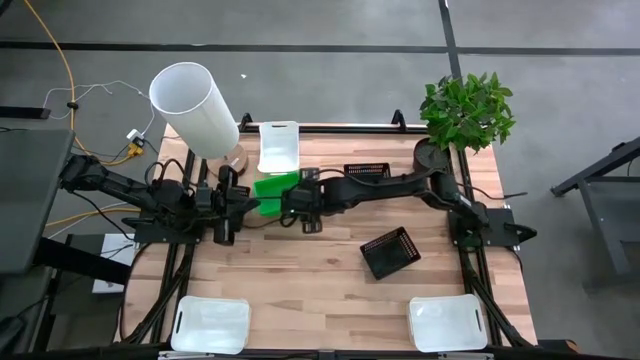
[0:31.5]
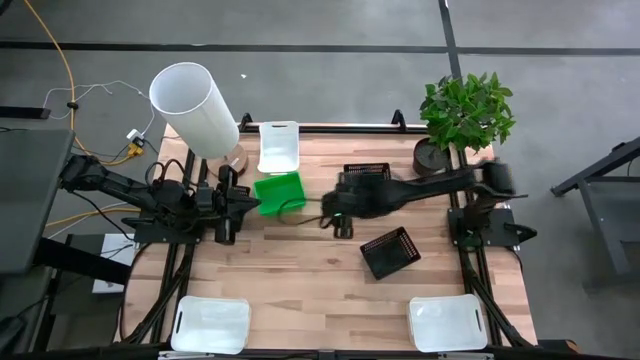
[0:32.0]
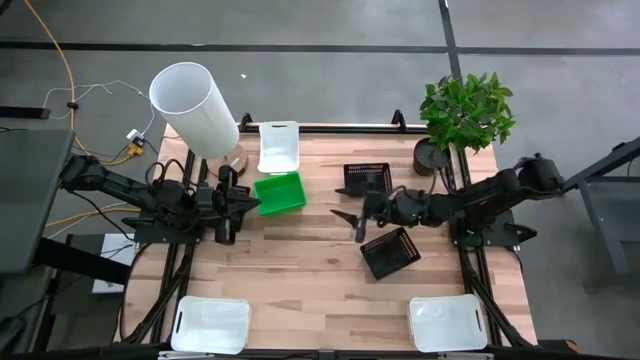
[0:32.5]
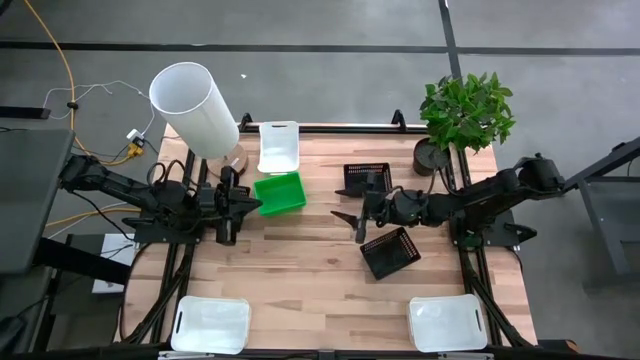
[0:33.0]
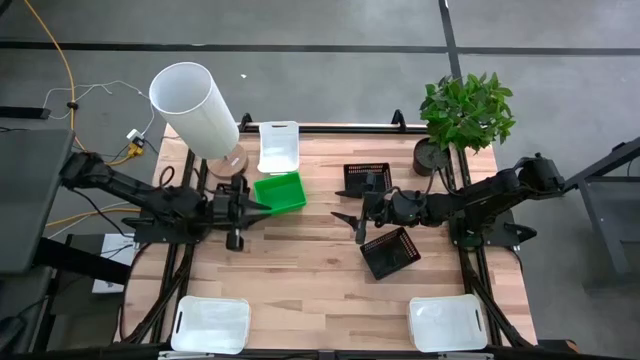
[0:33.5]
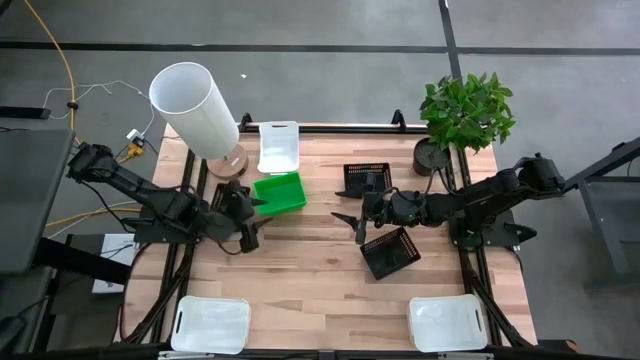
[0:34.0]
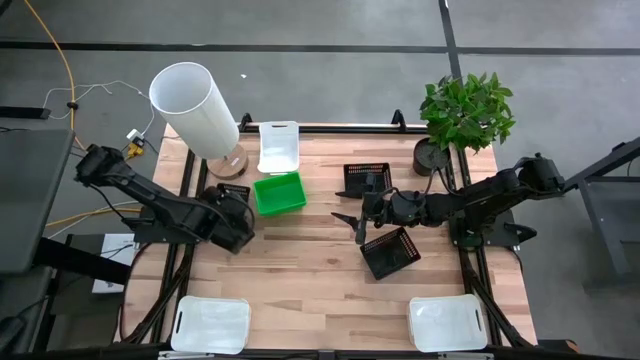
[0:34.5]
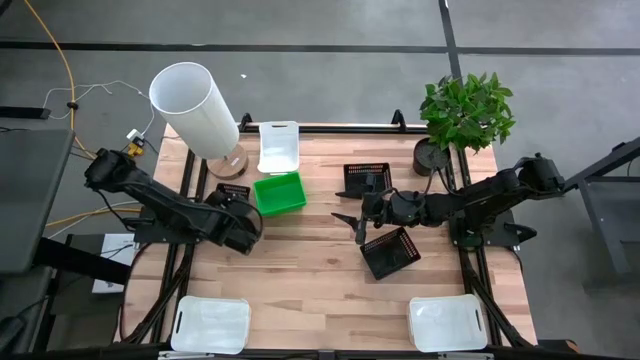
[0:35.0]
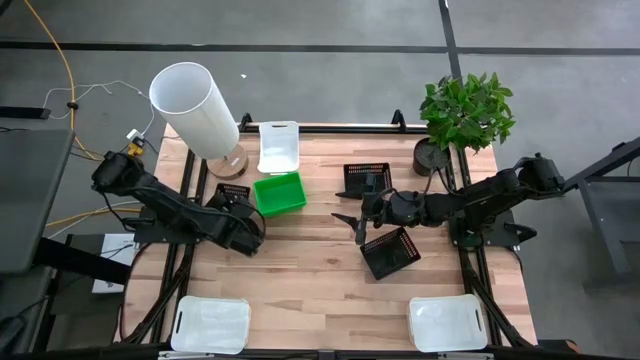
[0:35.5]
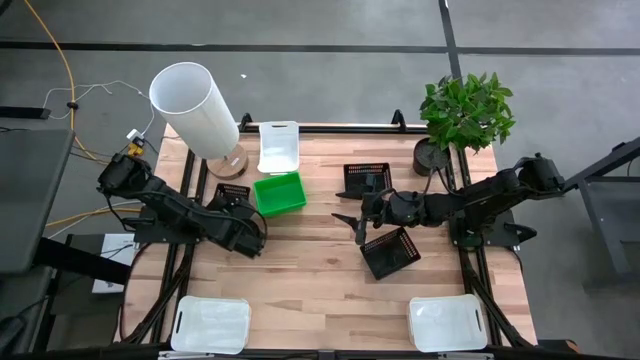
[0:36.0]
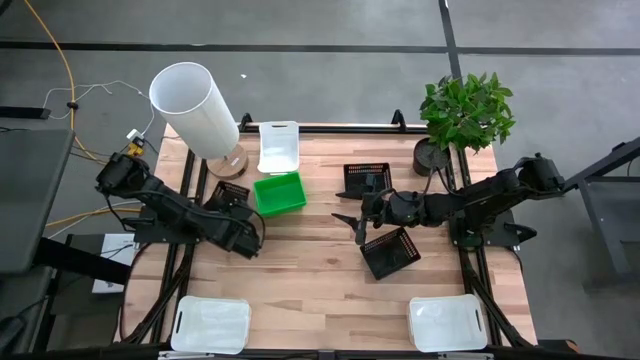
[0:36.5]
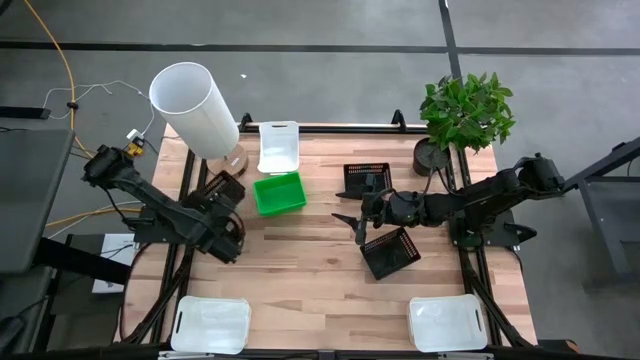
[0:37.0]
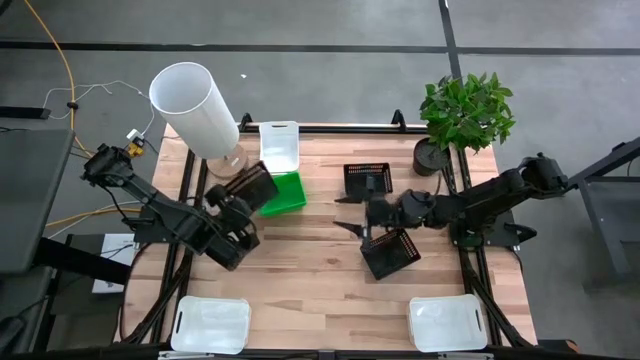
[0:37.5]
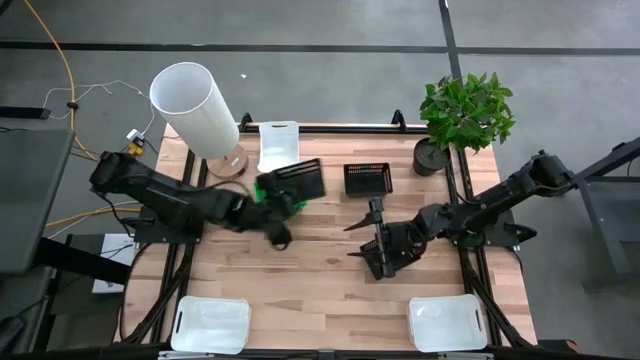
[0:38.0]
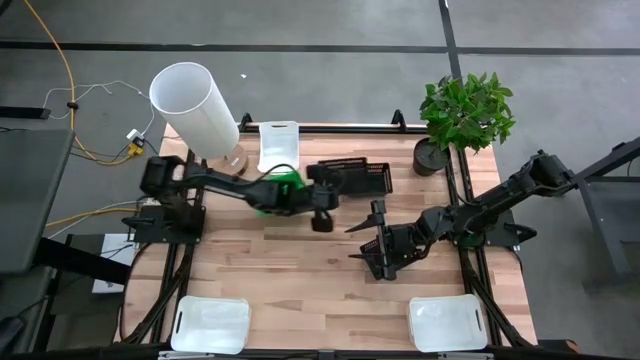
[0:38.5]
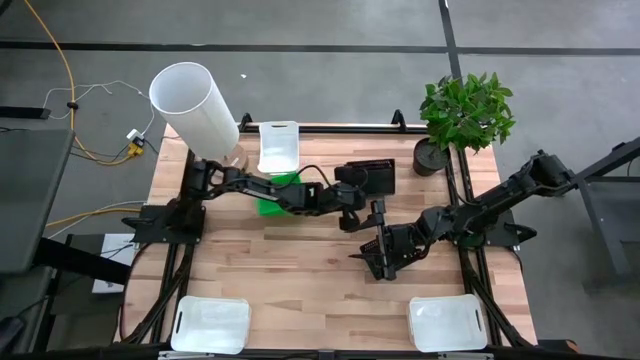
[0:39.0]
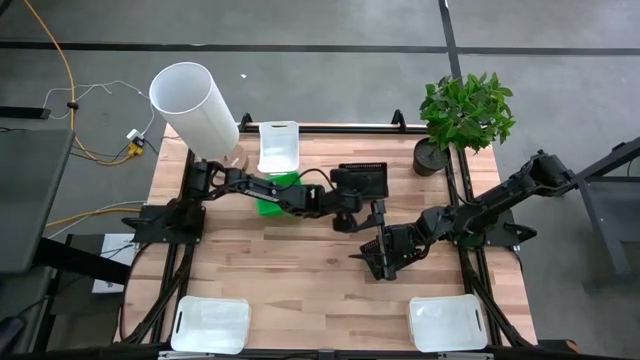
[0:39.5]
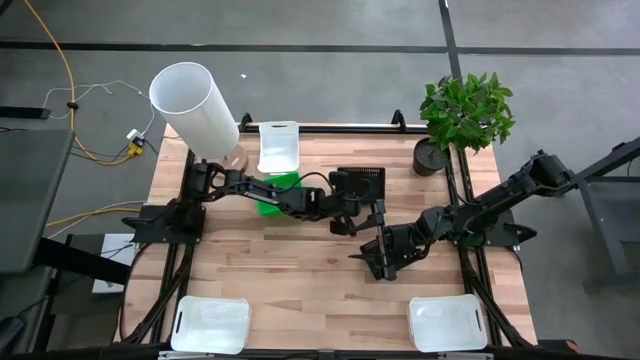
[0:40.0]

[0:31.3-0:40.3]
Stack the left black bin on the top-right black bin

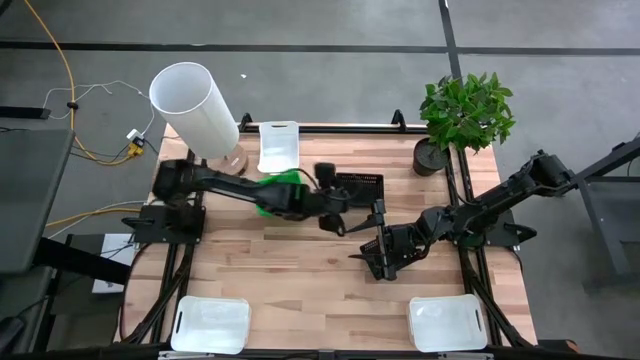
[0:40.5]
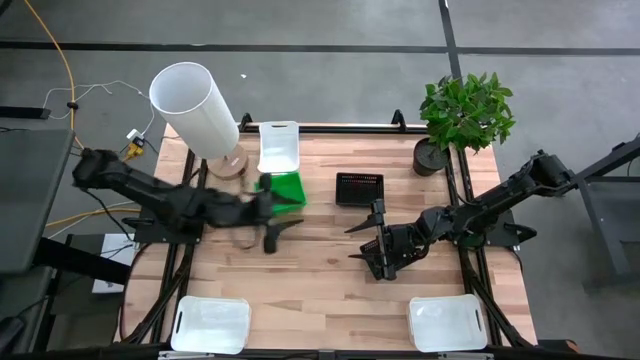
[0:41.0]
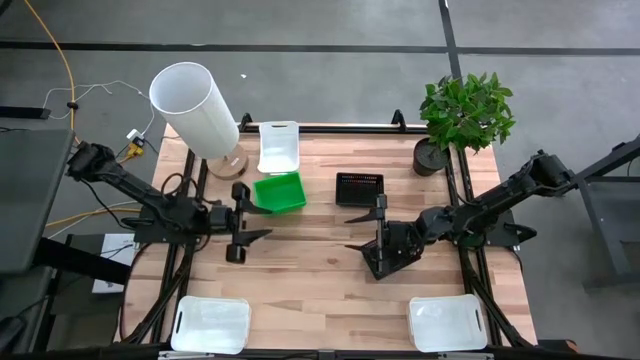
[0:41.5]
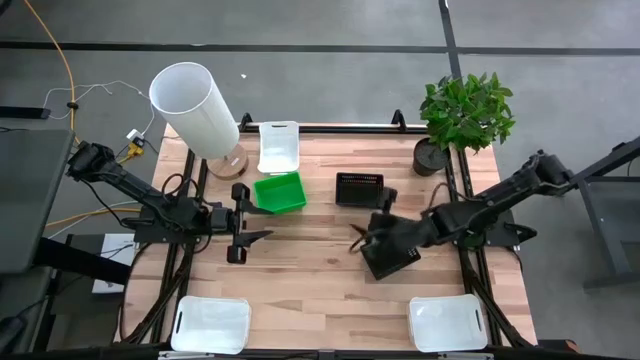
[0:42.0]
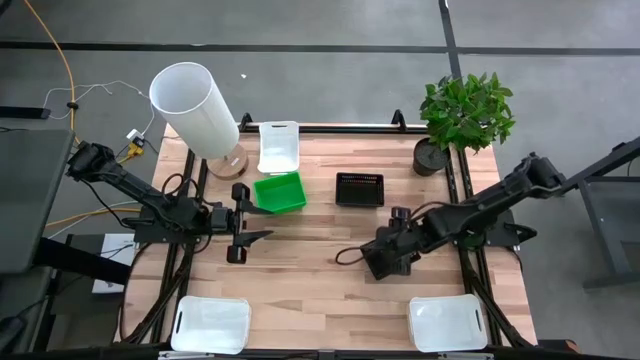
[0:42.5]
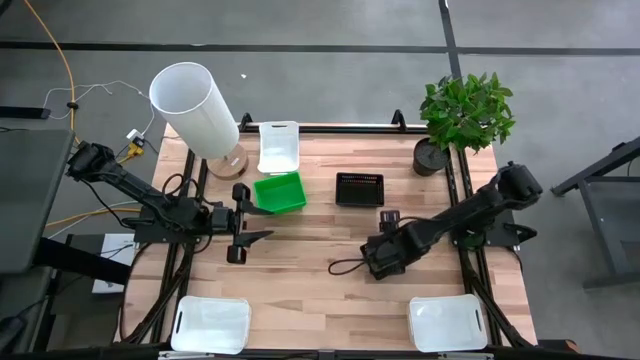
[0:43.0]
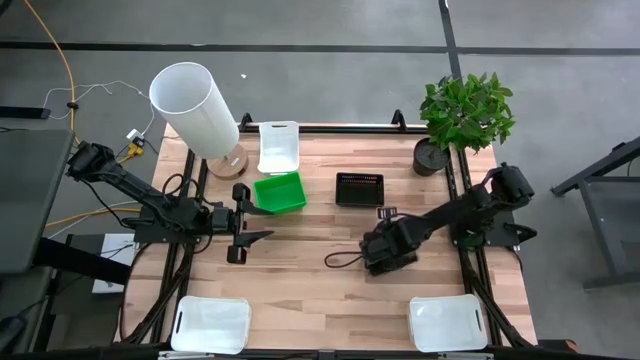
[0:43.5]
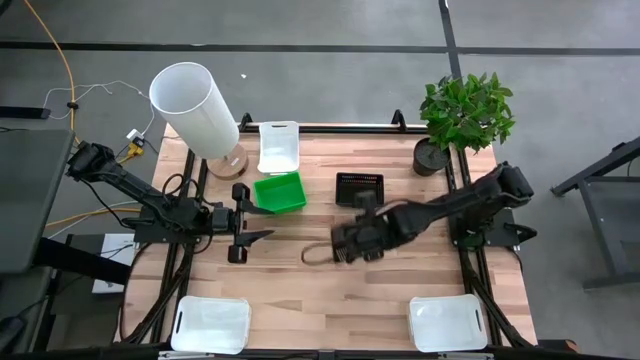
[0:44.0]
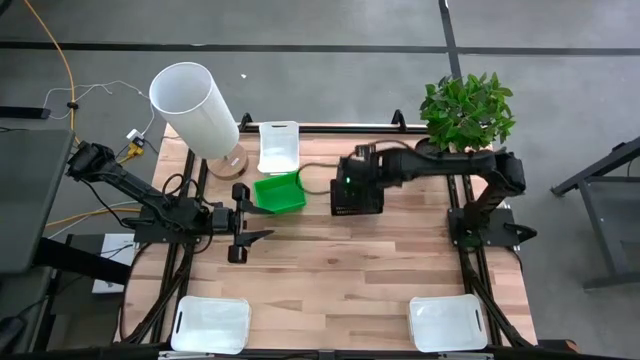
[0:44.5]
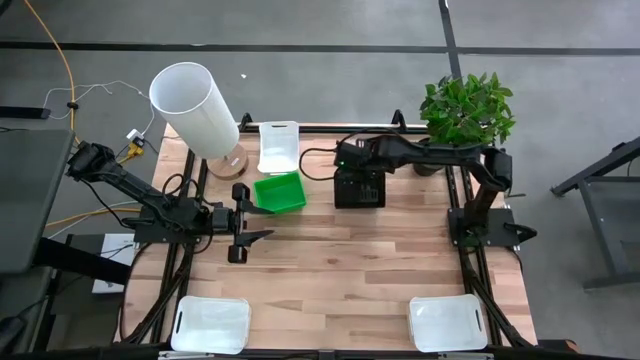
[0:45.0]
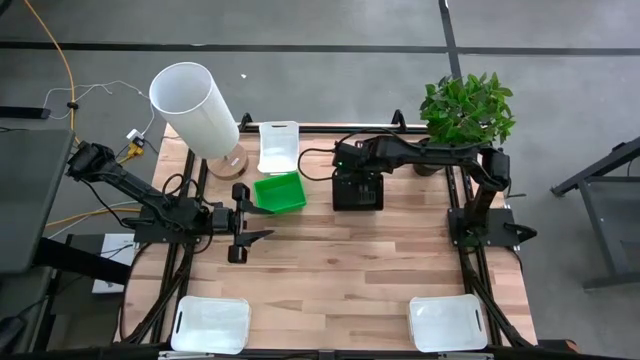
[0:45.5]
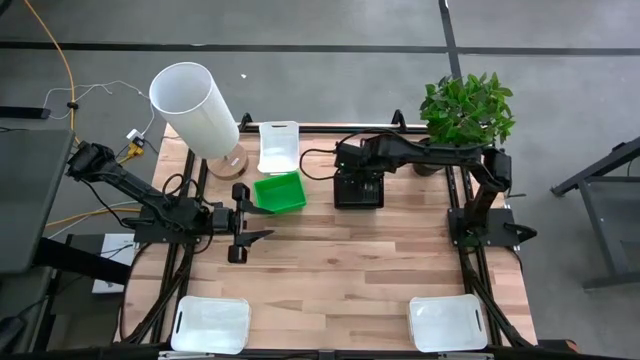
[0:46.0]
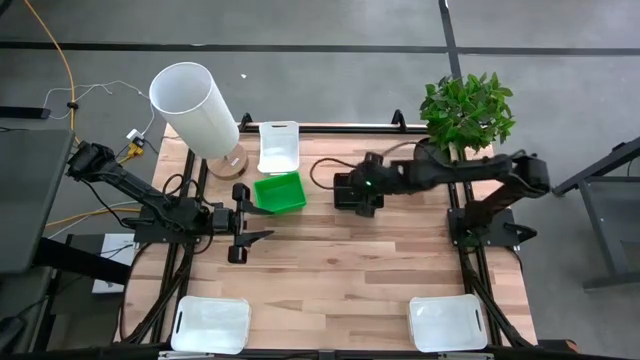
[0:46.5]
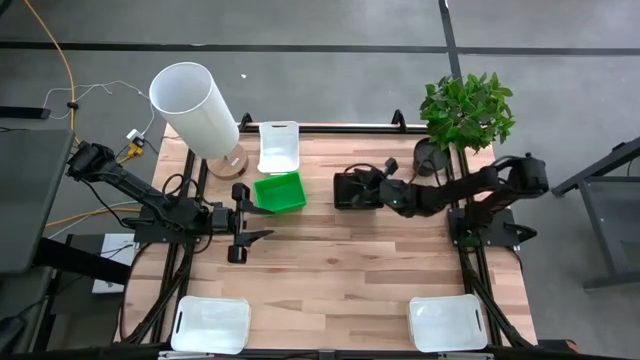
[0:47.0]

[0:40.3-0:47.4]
Stack the bottom black bin on the black bin

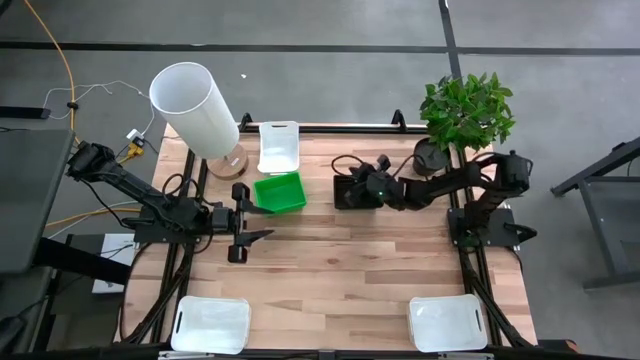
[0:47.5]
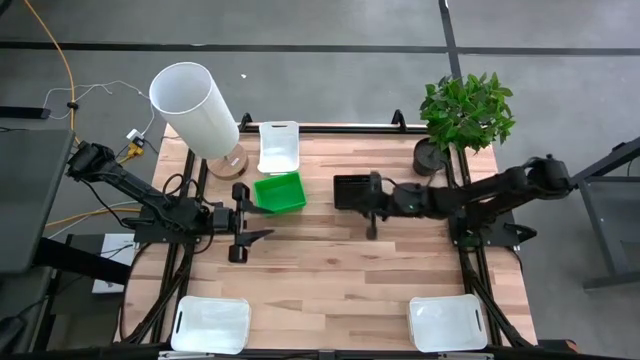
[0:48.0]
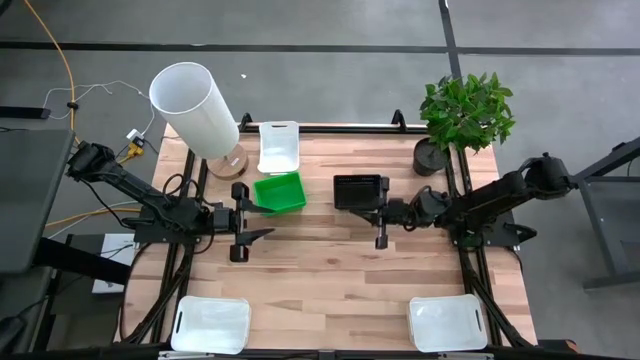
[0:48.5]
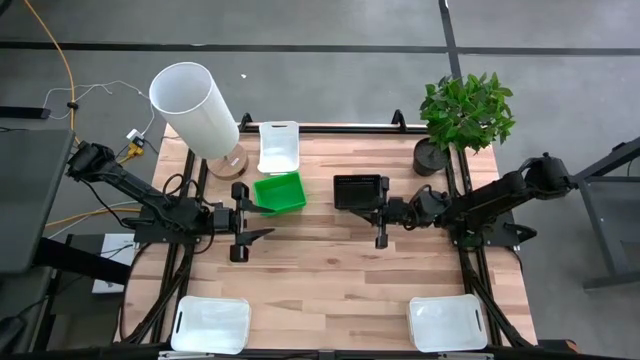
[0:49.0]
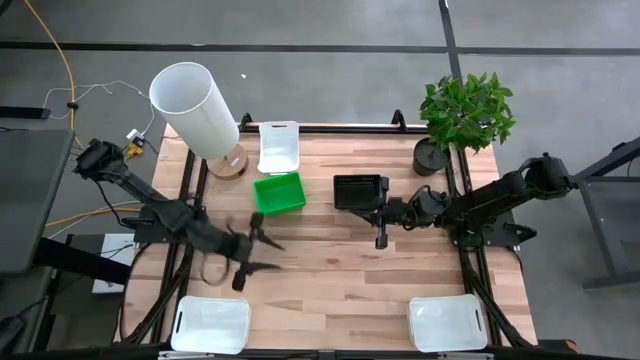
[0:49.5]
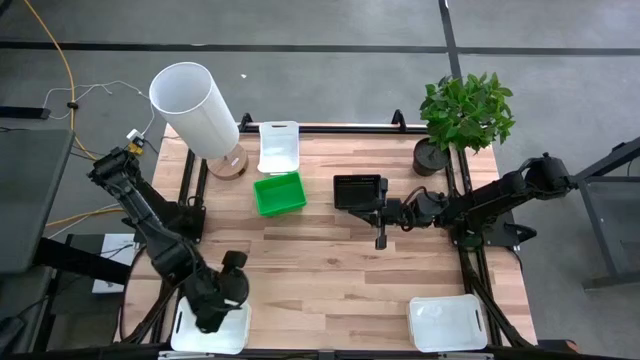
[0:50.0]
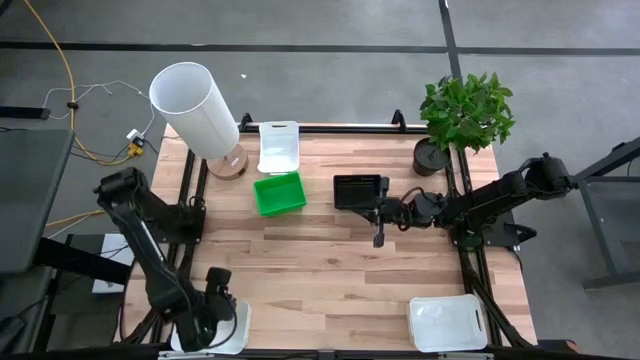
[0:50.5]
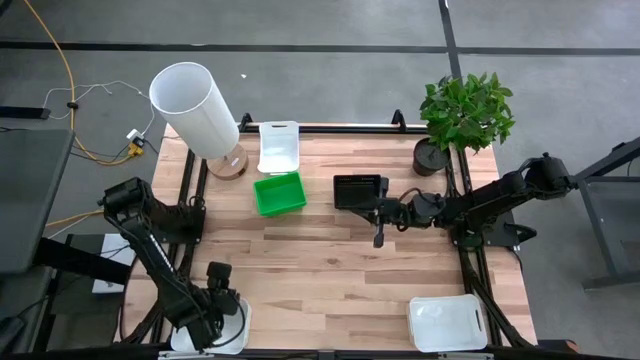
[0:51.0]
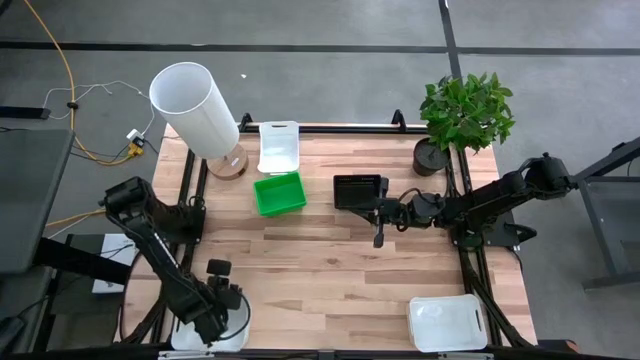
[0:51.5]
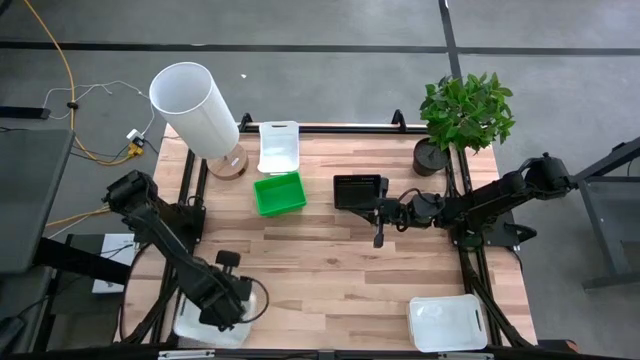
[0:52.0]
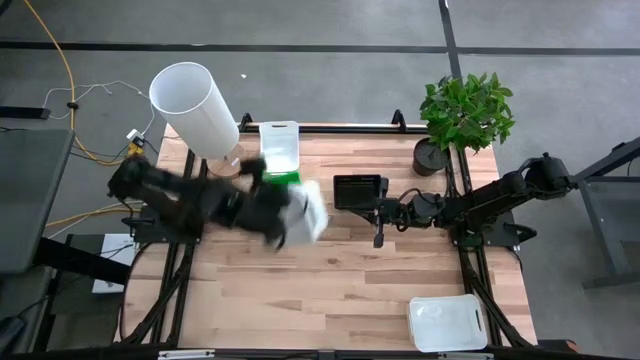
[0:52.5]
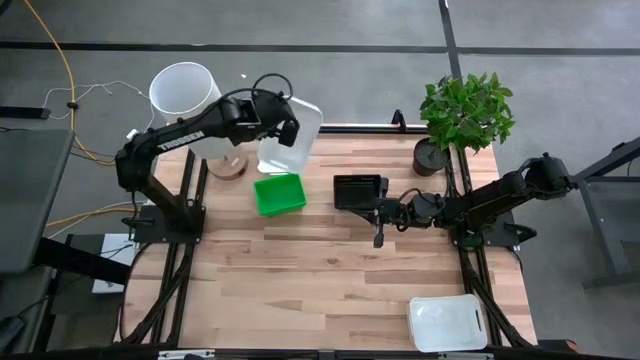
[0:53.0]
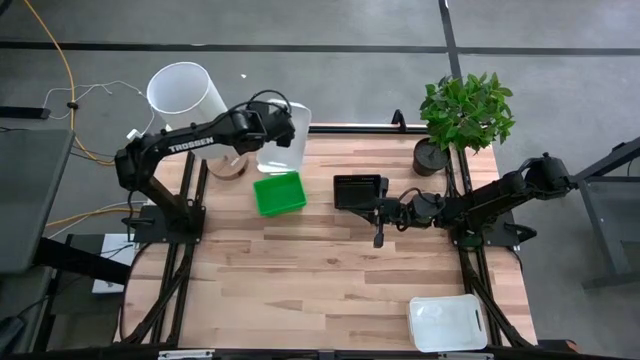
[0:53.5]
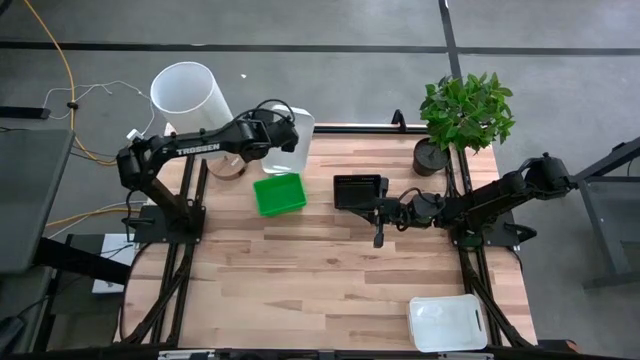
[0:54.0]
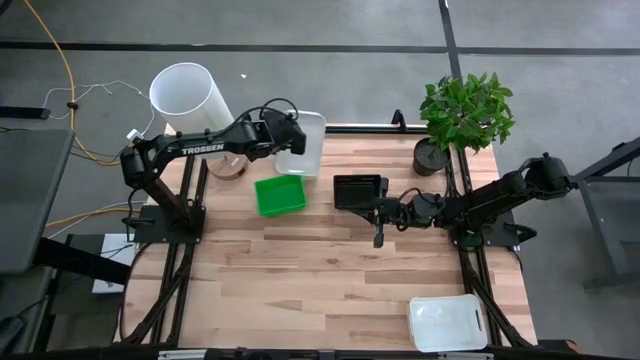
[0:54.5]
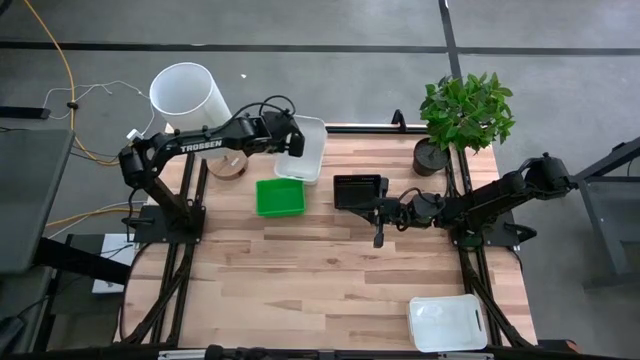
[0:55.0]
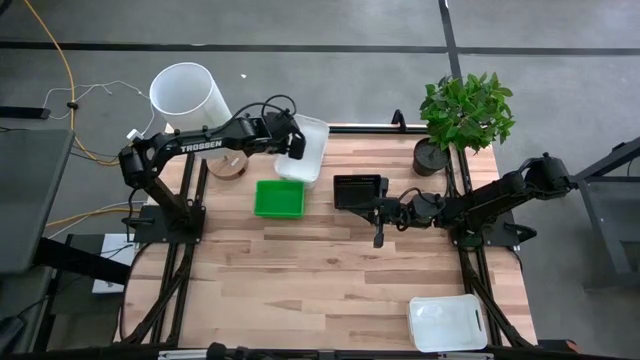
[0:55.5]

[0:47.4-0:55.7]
Stack the bottom-left white bin on the top white bin
